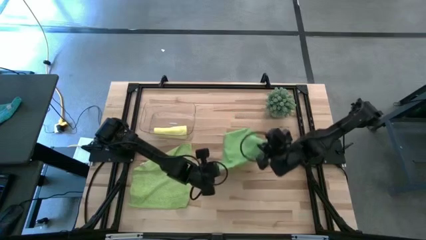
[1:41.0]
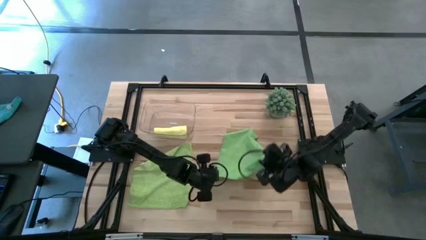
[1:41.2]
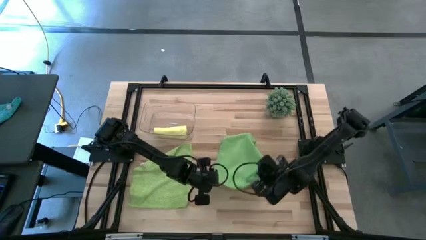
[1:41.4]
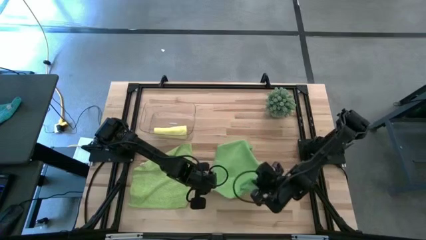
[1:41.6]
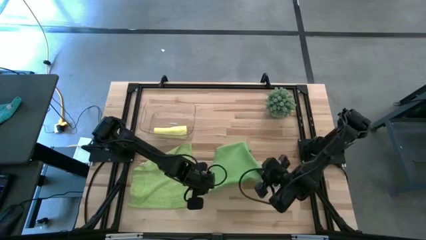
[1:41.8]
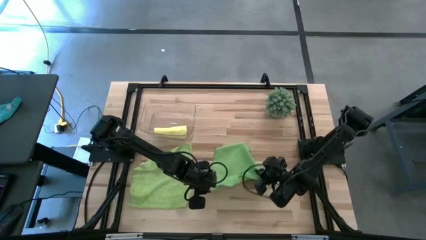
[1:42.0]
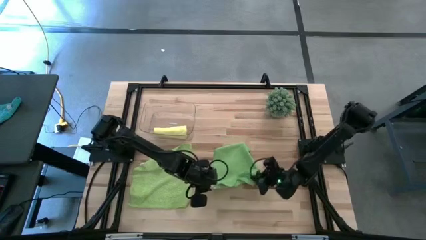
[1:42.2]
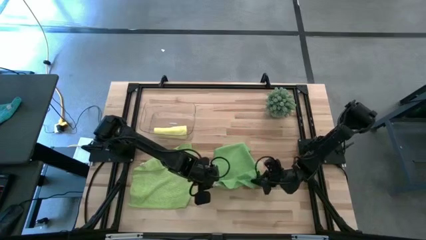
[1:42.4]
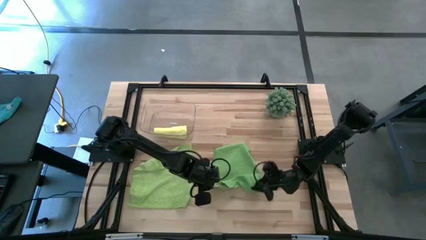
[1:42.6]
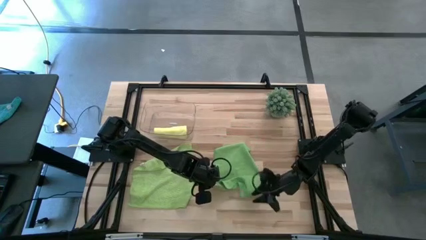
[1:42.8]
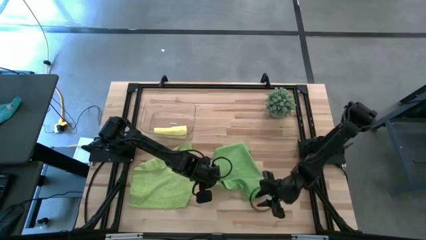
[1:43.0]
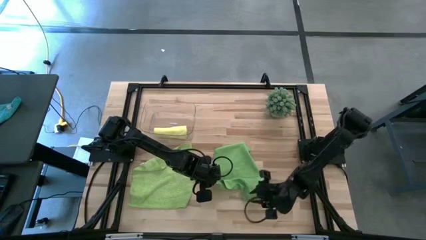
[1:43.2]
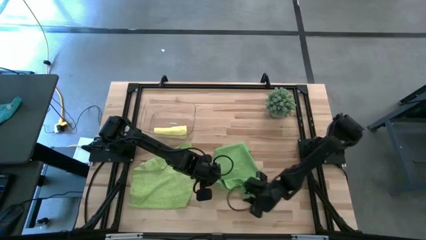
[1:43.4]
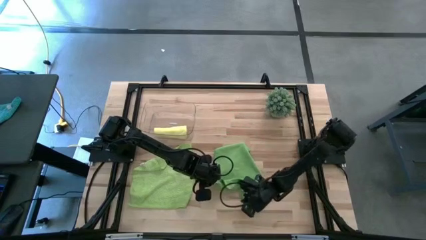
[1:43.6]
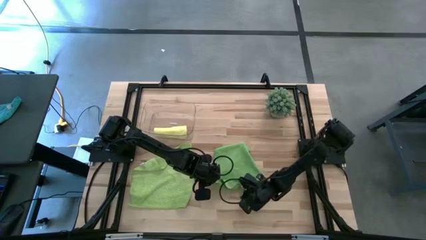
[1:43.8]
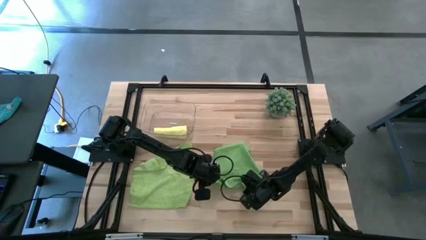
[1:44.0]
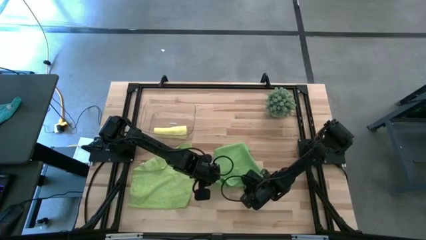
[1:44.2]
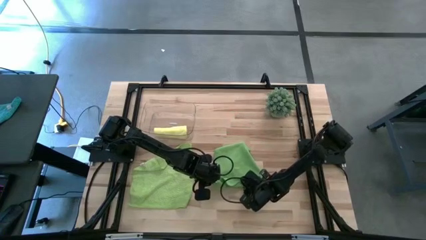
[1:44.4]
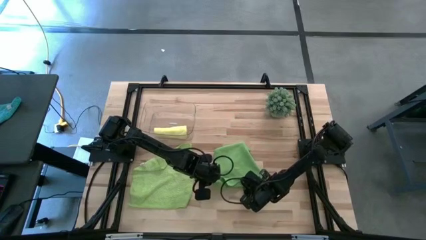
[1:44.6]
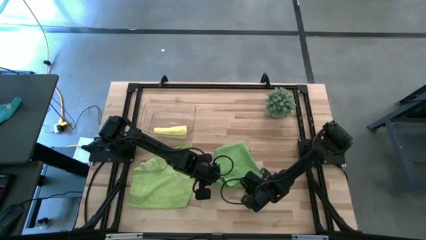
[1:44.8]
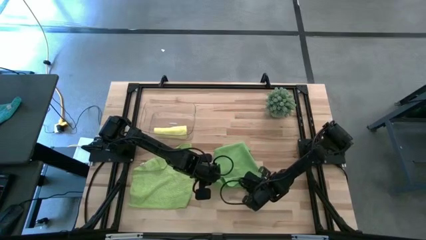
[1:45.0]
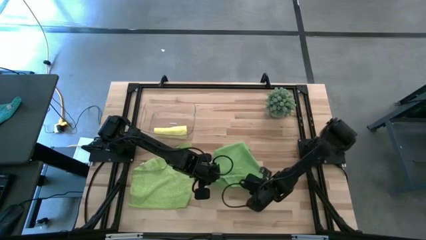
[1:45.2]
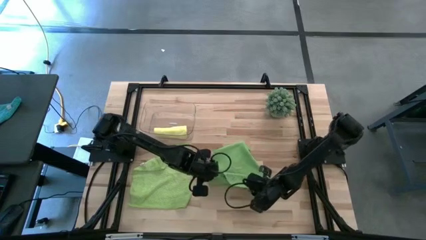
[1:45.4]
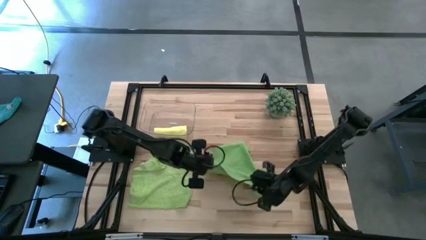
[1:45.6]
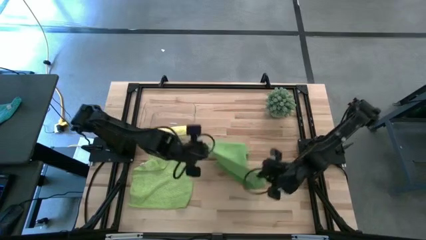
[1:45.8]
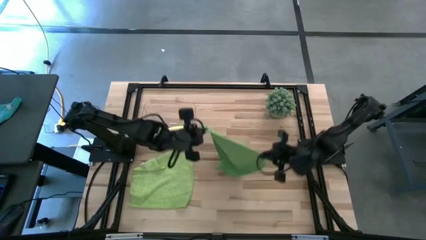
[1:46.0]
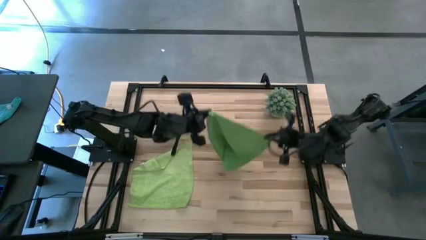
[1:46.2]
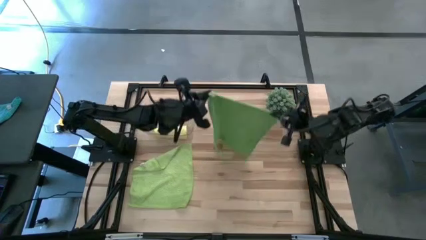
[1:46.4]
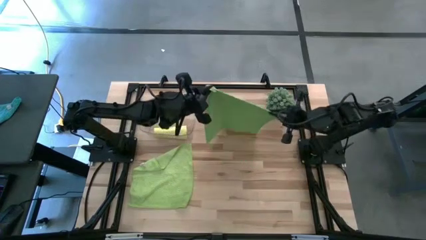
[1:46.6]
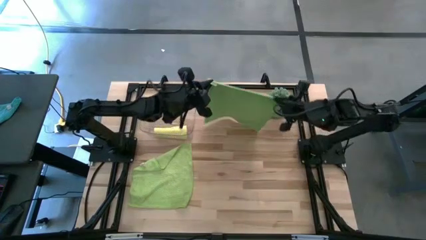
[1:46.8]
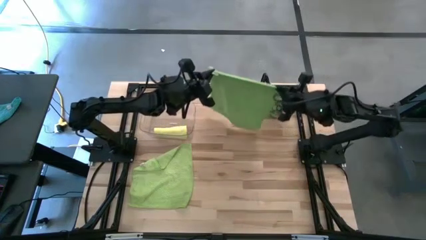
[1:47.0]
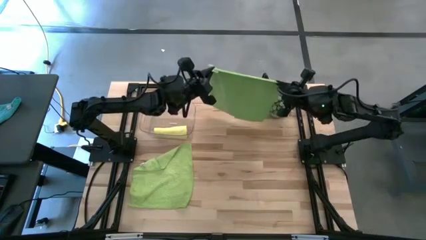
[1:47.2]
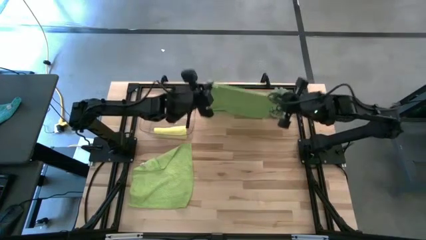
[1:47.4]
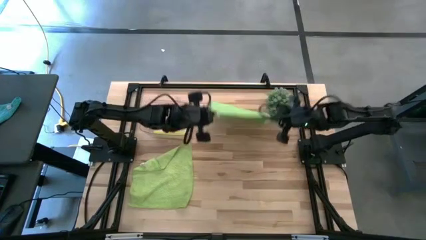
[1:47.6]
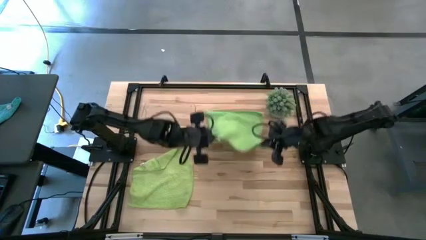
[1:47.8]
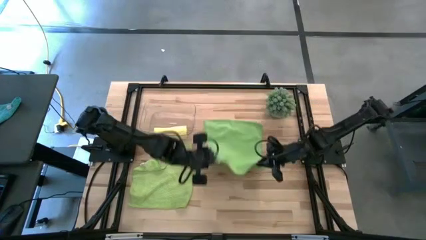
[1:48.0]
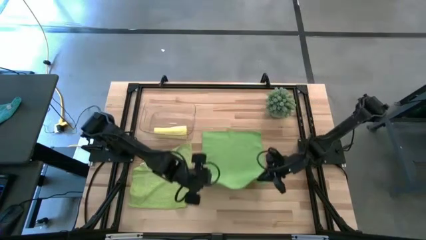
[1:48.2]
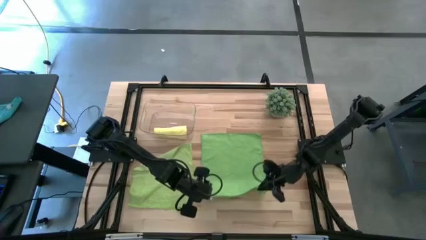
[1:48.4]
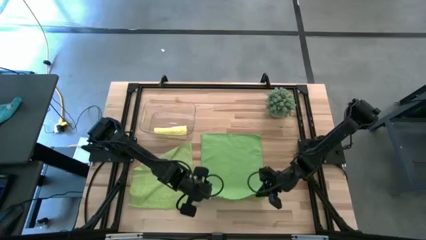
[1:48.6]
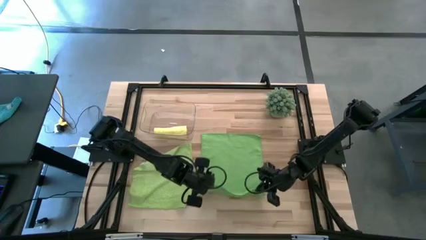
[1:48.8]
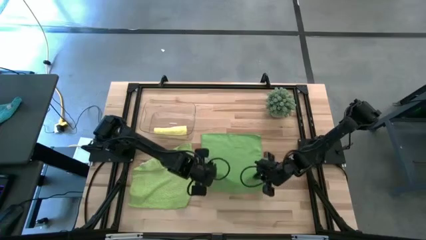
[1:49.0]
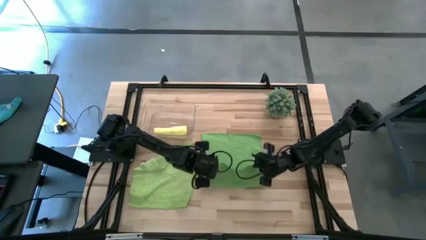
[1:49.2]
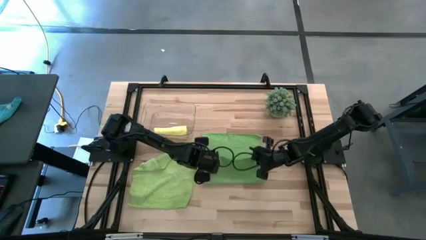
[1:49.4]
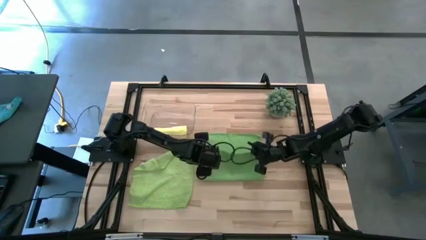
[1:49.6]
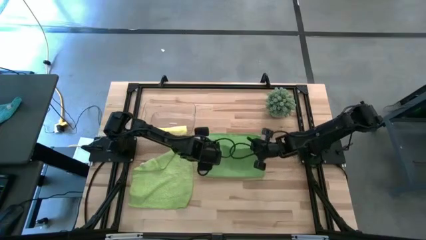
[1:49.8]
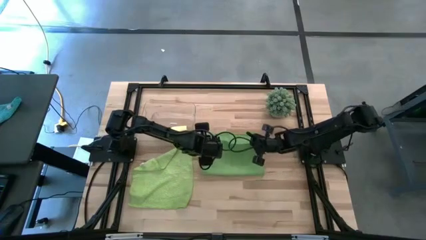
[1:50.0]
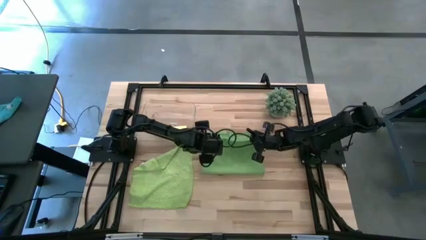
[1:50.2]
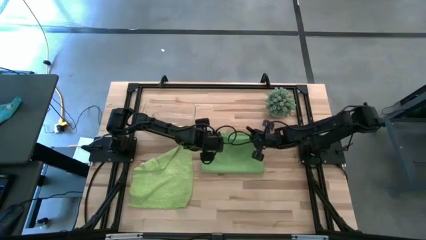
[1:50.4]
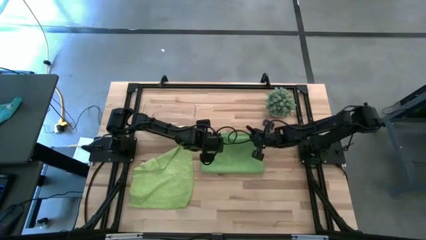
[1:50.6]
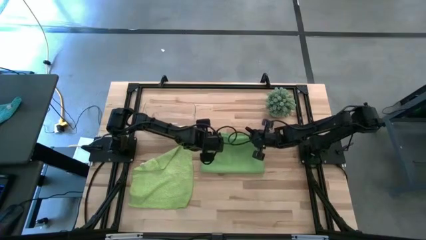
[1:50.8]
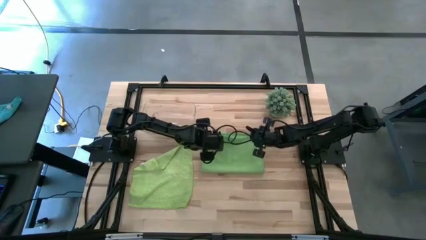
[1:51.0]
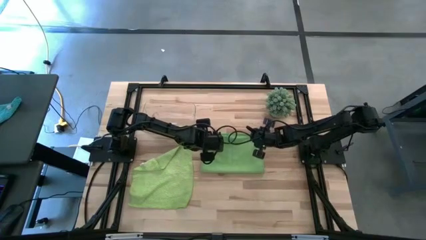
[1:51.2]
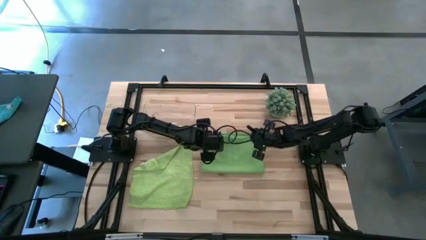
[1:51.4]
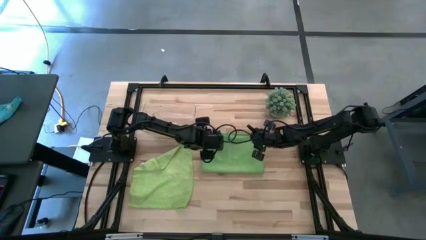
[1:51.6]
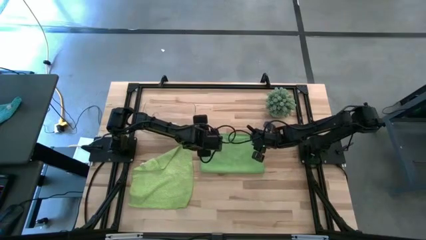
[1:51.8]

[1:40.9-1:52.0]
Task: Roll microfiber towels into tight, uniform cylinder then place into a basket
Fold the right green towel

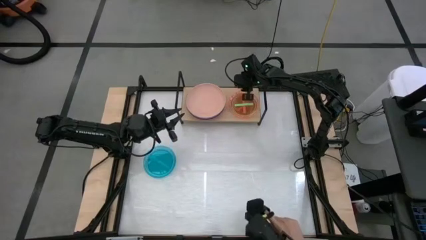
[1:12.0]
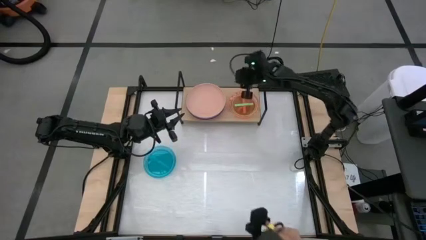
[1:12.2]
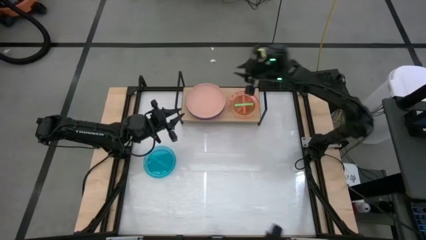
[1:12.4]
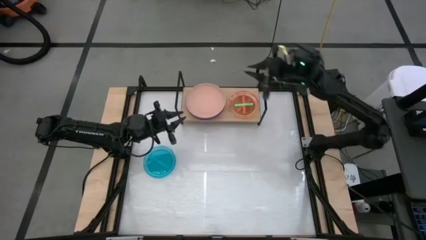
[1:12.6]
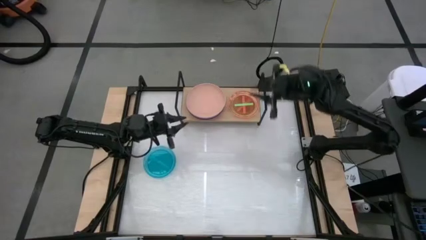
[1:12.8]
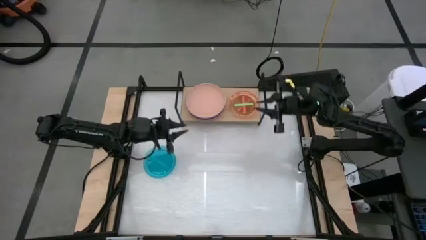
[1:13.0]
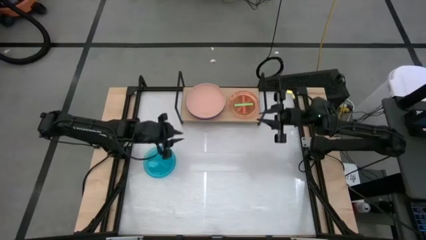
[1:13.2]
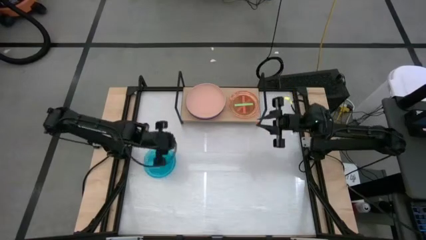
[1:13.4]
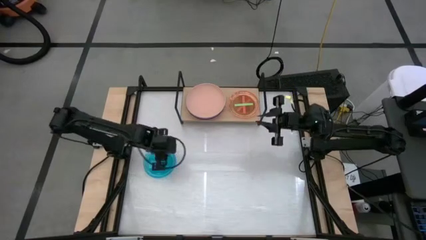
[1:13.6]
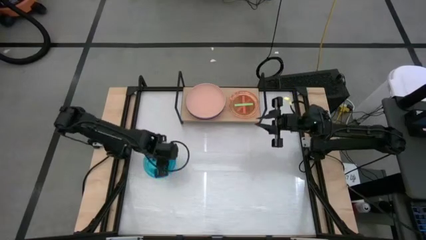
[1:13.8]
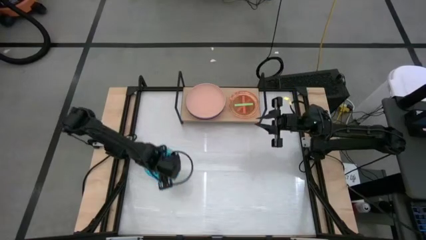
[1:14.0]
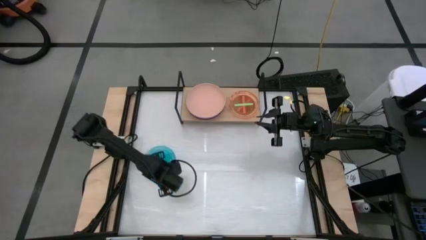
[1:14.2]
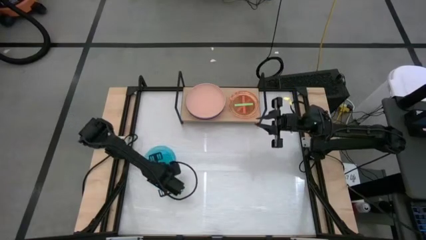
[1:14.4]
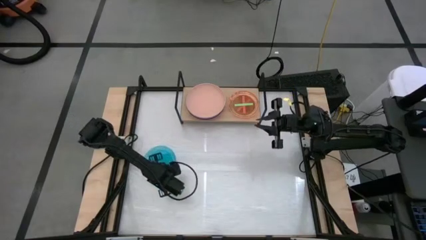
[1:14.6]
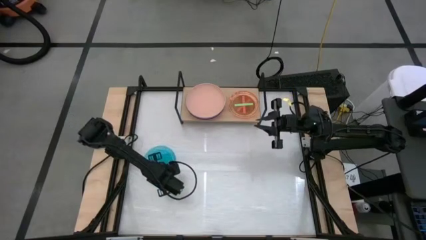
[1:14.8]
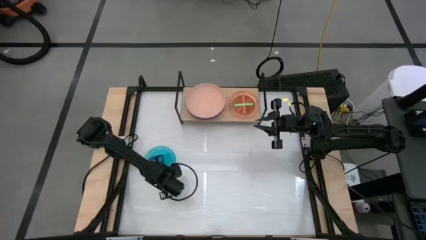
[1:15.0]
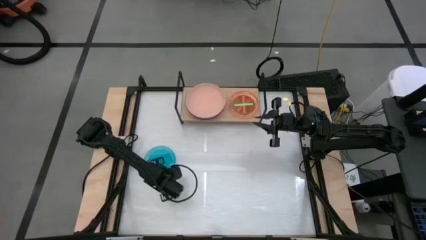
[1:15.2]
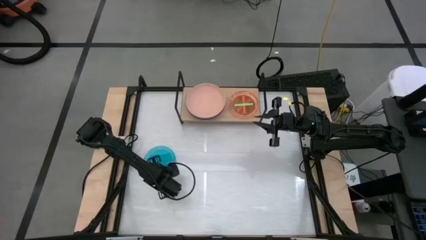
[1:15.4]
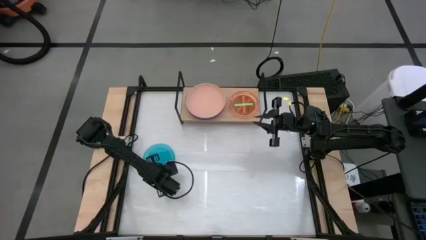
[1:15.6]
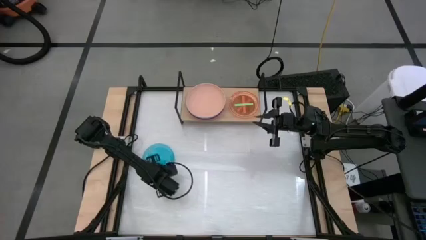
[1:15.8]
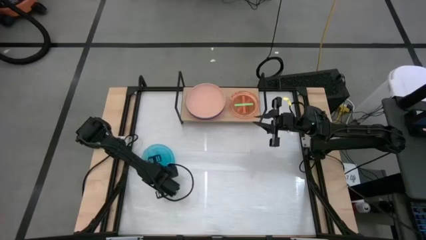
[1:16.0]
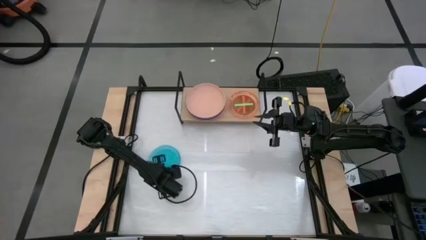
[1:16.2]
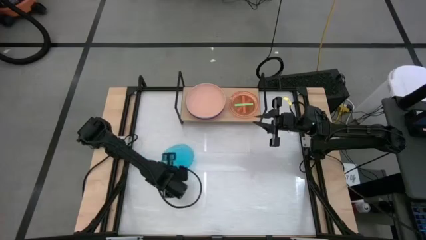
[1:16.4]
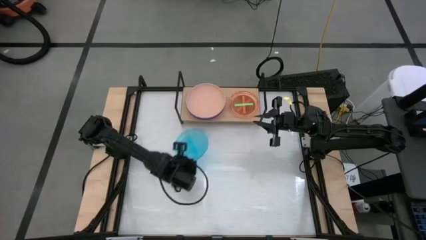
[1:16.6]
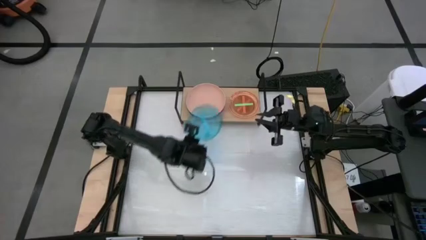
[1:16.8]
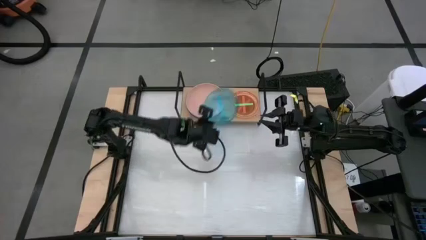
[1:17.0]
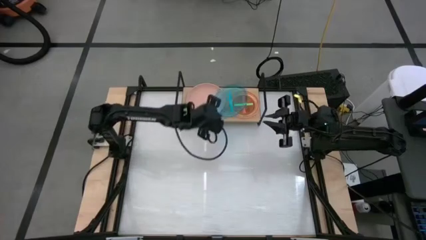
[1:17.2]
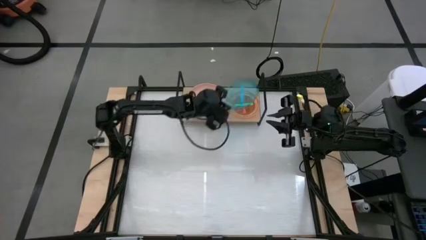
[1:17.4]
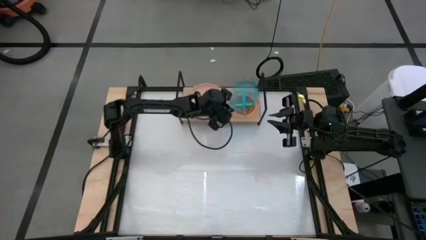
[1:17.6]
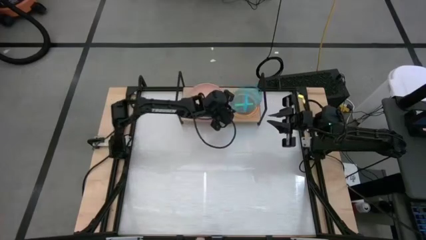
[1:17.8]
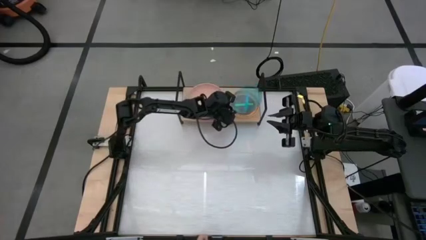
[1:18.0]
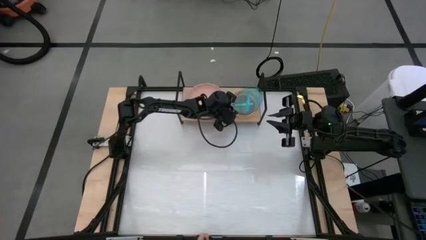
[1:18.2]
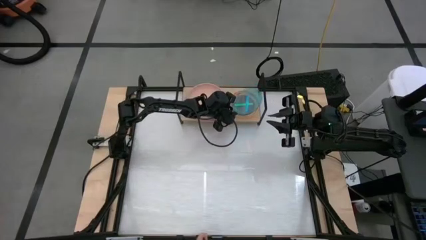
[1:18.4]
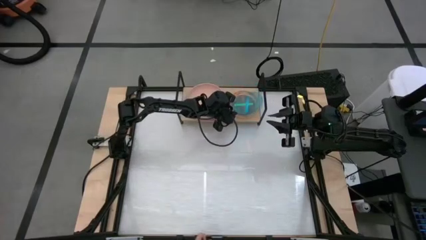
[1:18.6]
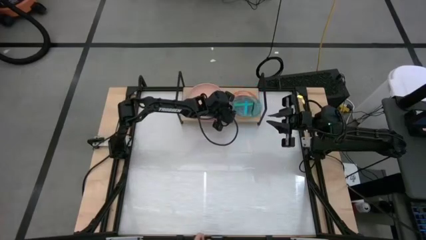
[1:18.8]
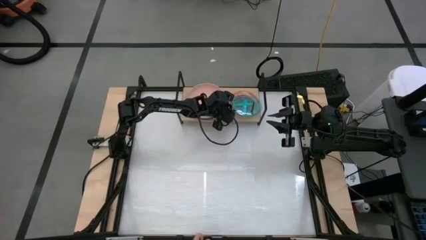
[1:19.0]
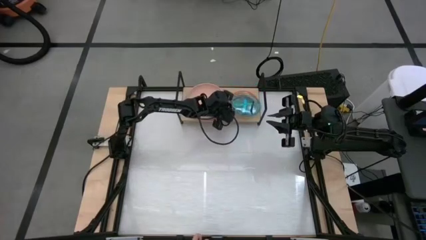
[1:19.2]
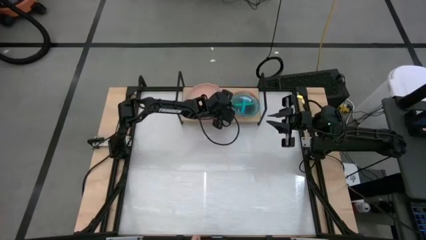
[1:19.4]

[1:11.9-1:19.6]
Task: Place and stack plates onto a shelf
Stack the blue transparent plate on top of the green transparent plate on the shelf
